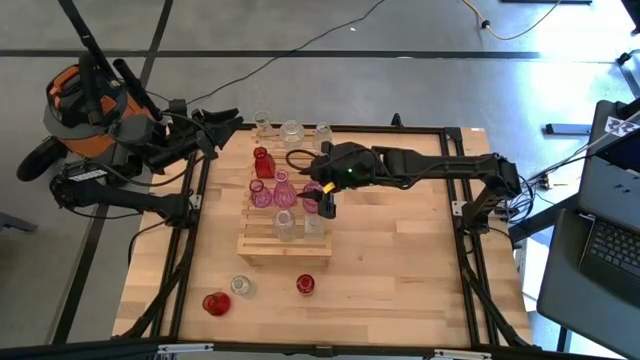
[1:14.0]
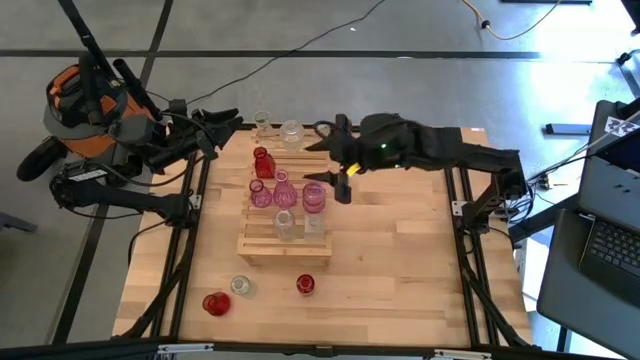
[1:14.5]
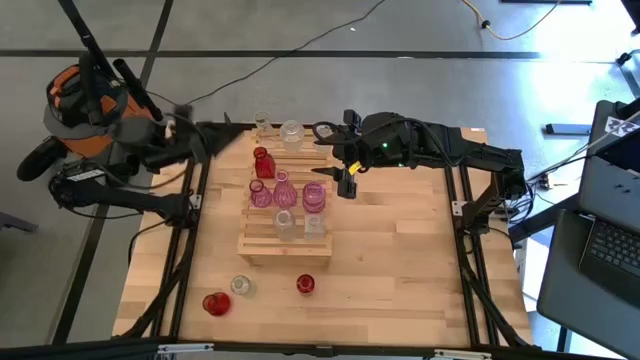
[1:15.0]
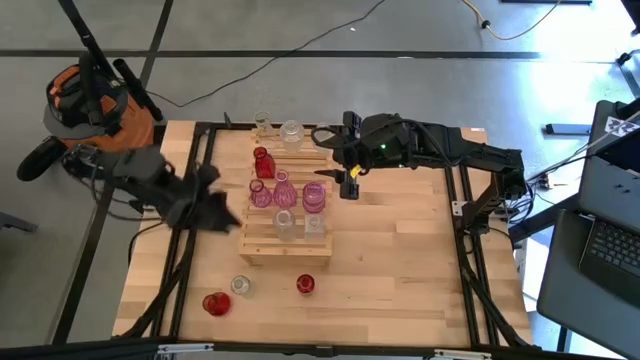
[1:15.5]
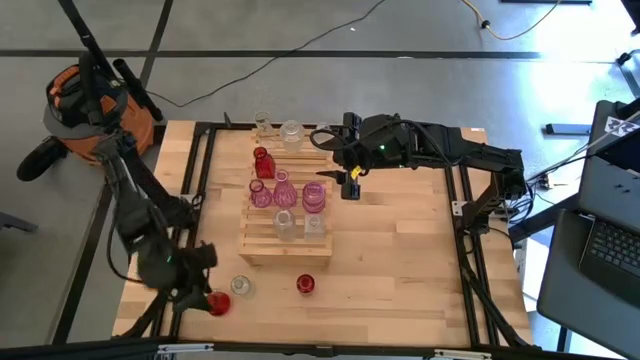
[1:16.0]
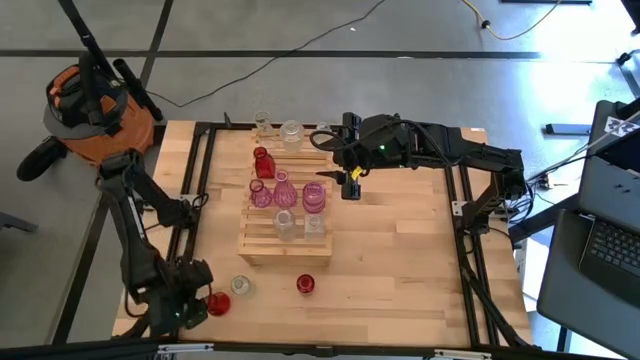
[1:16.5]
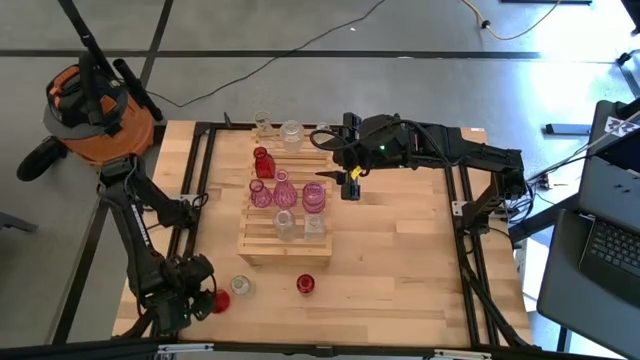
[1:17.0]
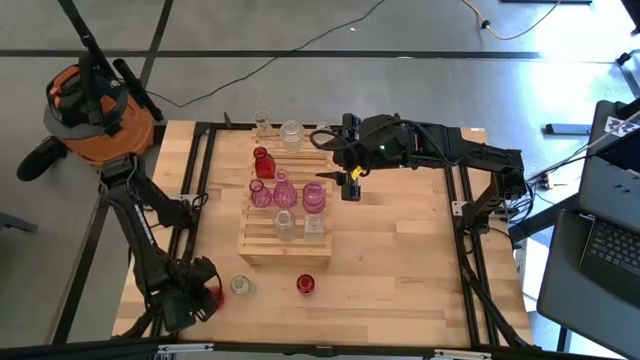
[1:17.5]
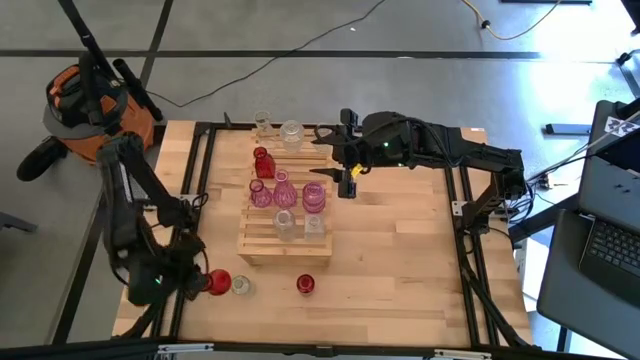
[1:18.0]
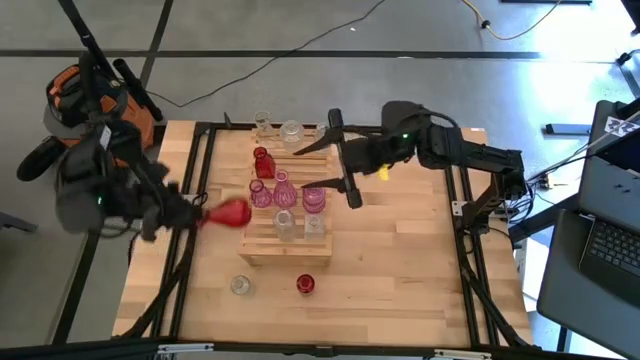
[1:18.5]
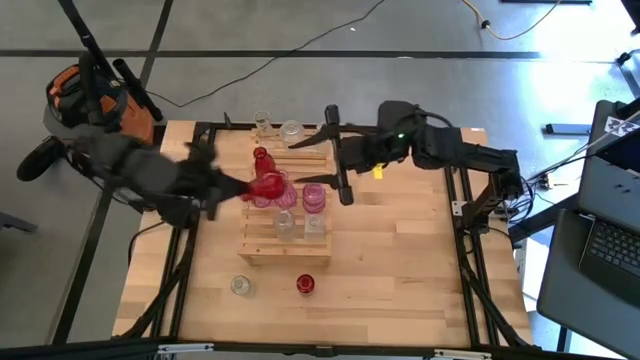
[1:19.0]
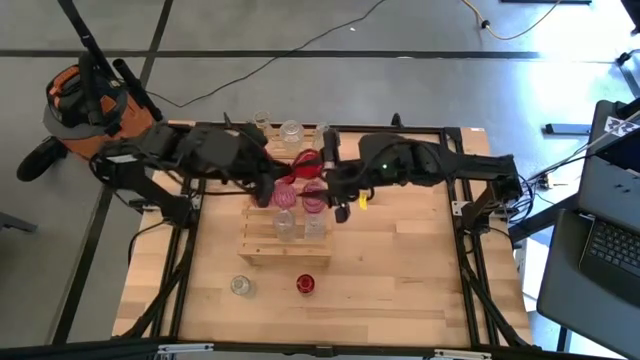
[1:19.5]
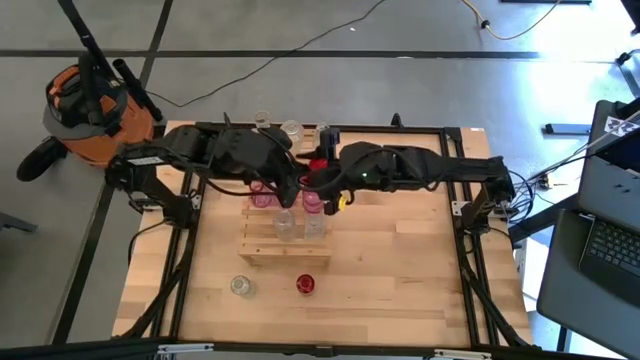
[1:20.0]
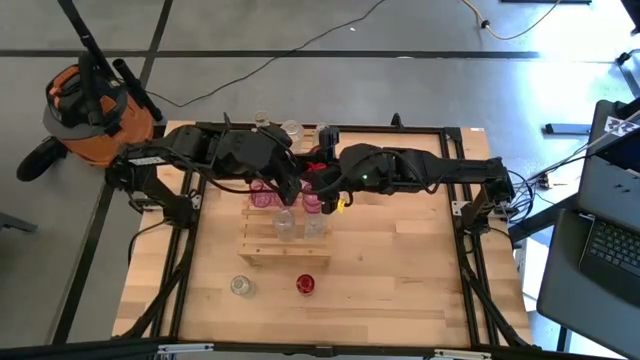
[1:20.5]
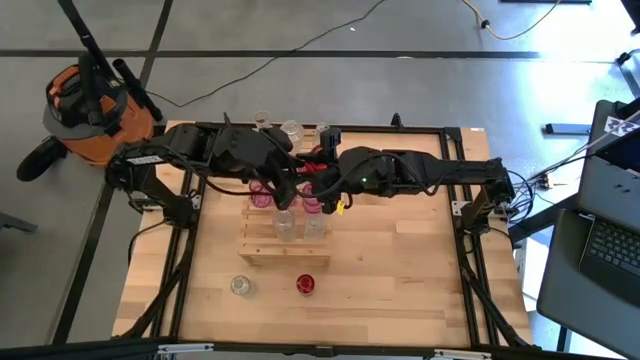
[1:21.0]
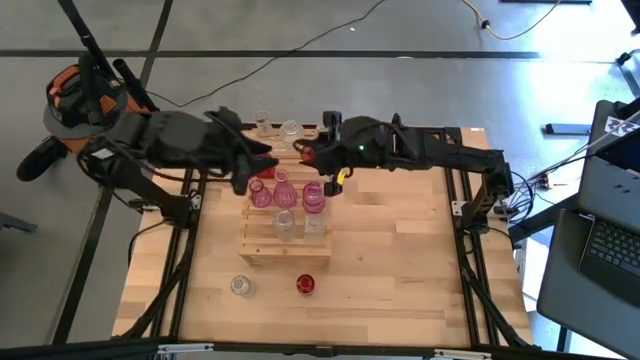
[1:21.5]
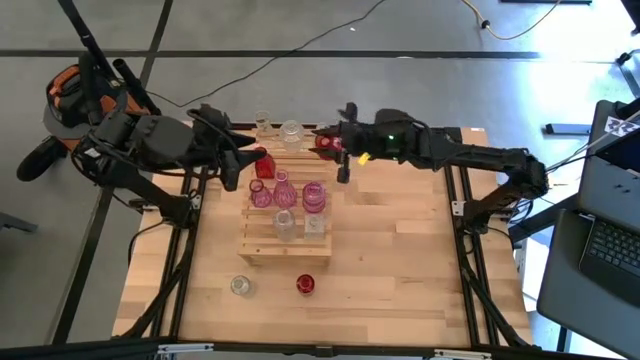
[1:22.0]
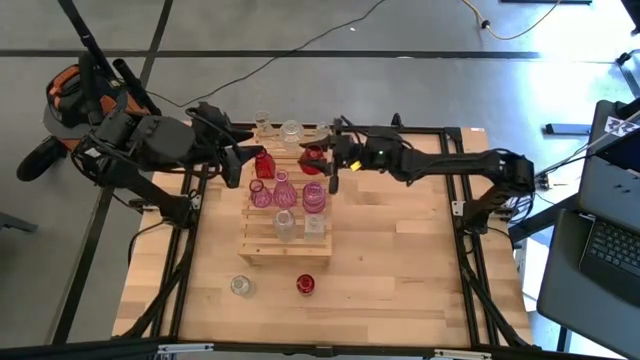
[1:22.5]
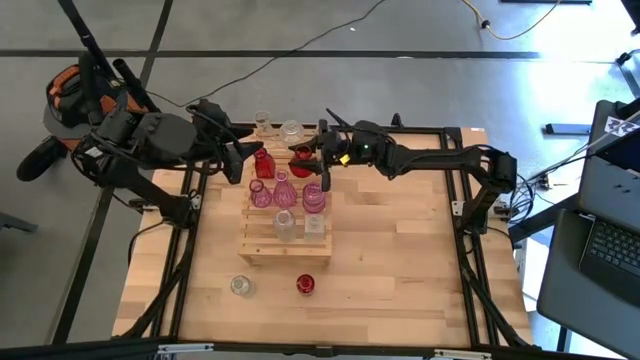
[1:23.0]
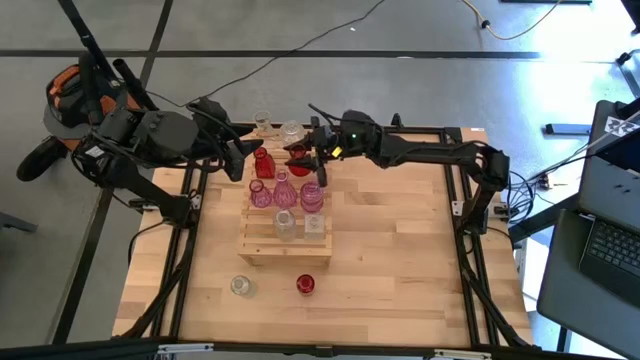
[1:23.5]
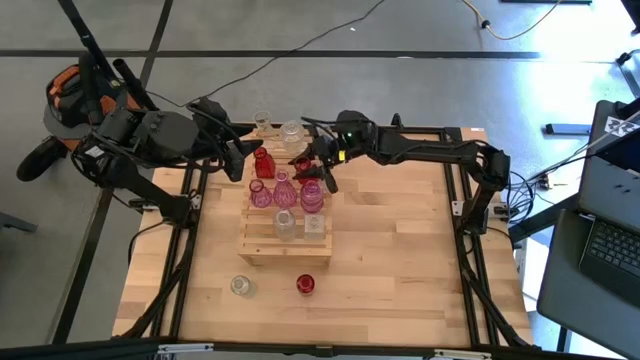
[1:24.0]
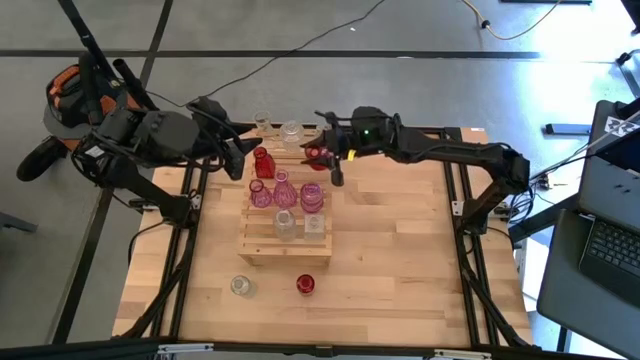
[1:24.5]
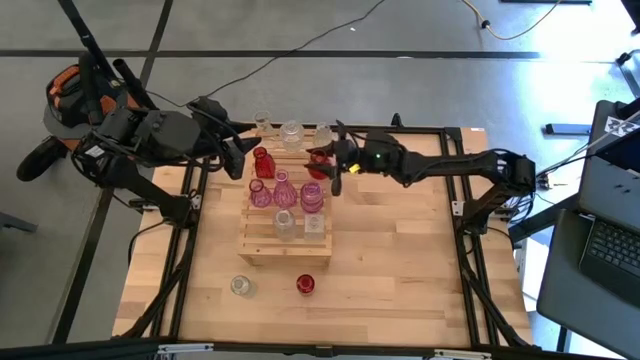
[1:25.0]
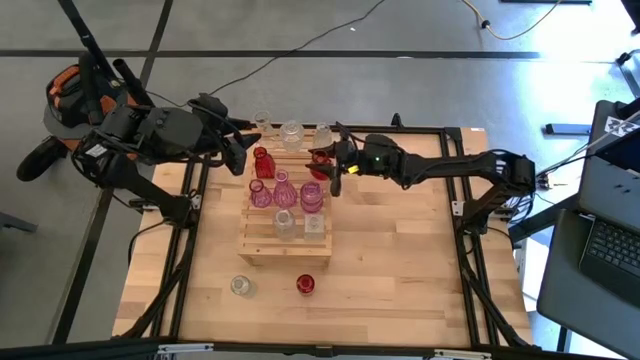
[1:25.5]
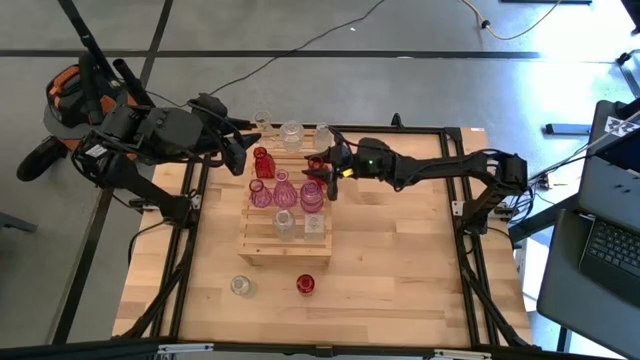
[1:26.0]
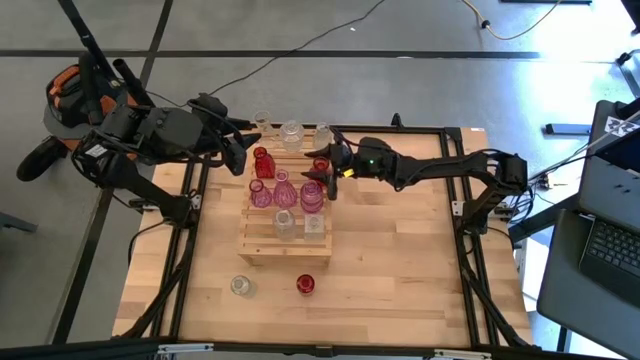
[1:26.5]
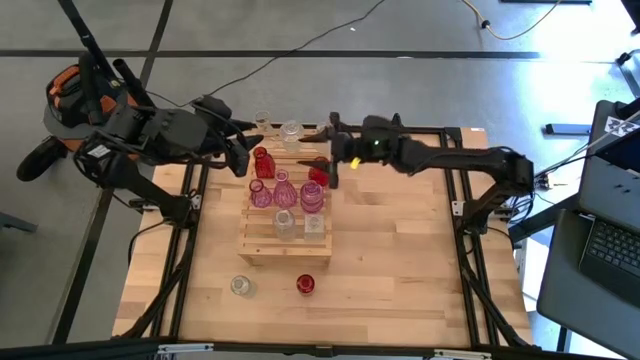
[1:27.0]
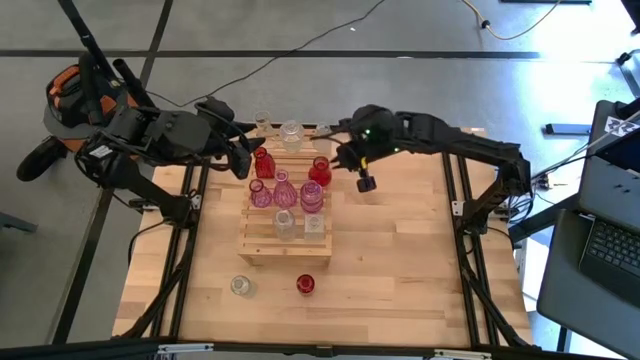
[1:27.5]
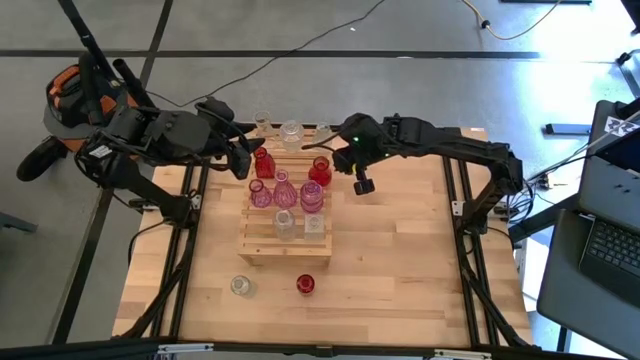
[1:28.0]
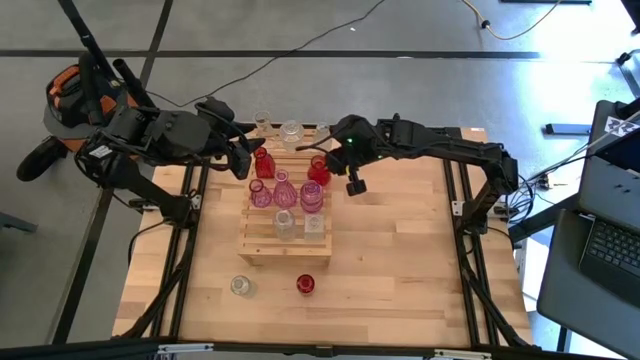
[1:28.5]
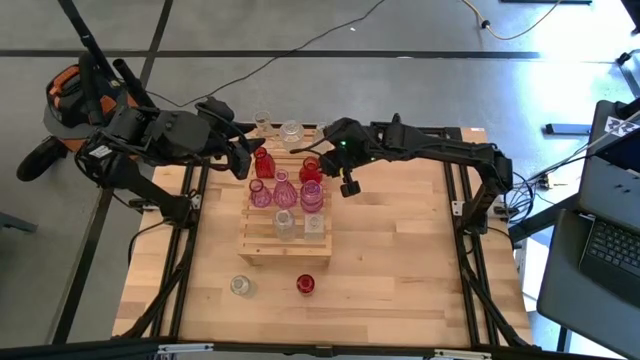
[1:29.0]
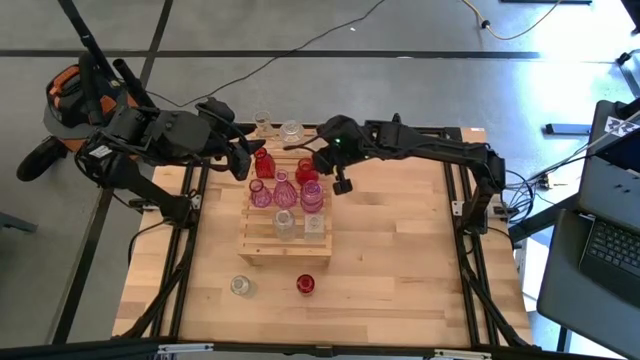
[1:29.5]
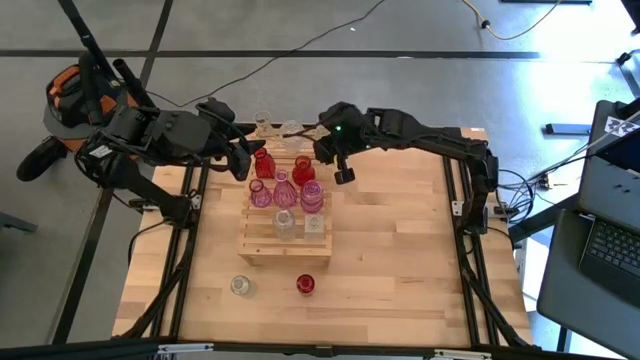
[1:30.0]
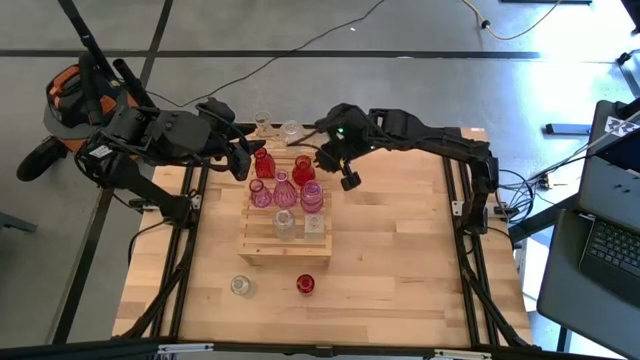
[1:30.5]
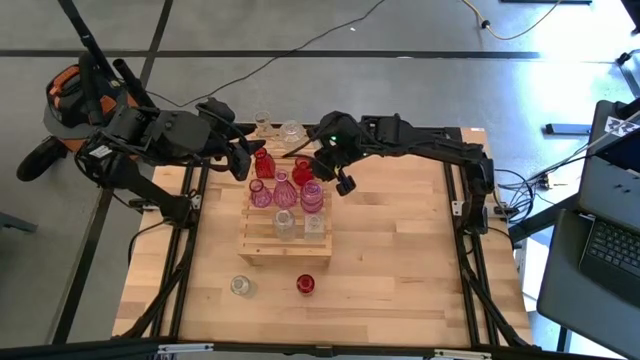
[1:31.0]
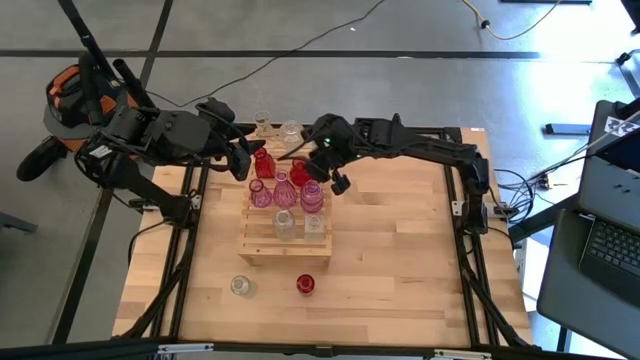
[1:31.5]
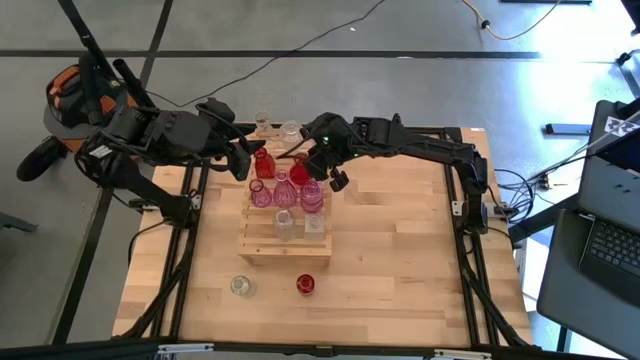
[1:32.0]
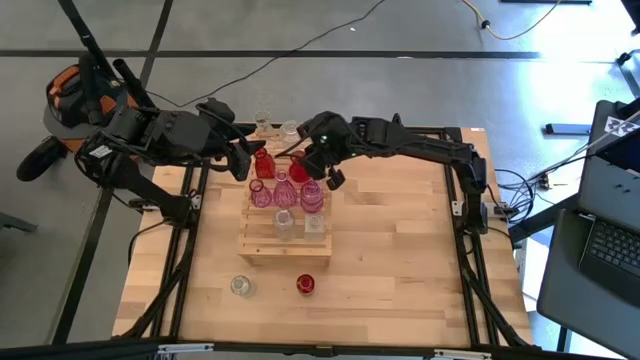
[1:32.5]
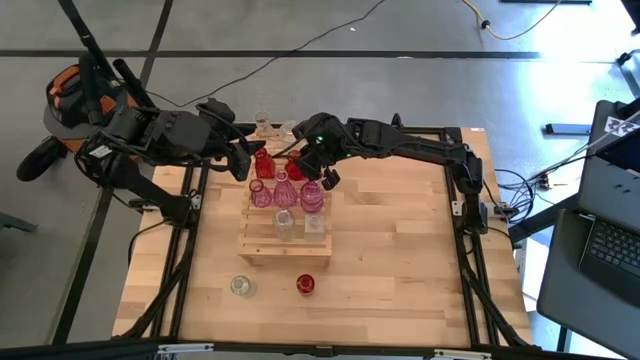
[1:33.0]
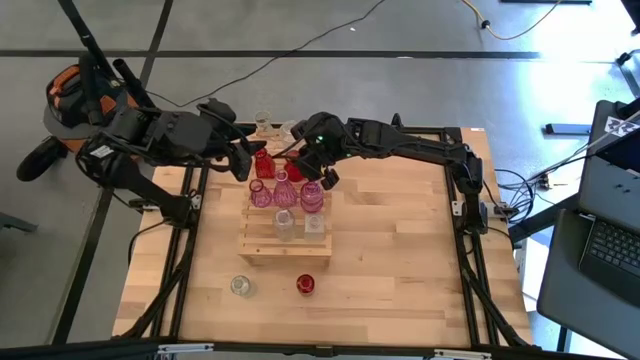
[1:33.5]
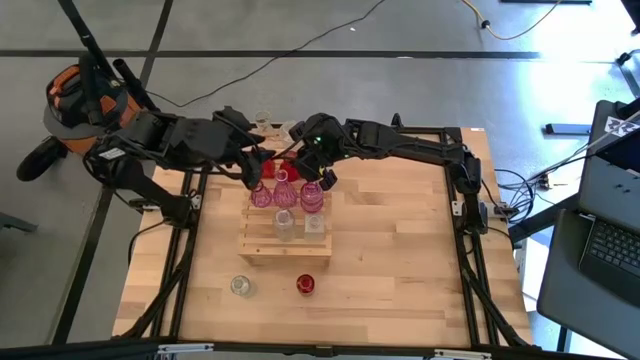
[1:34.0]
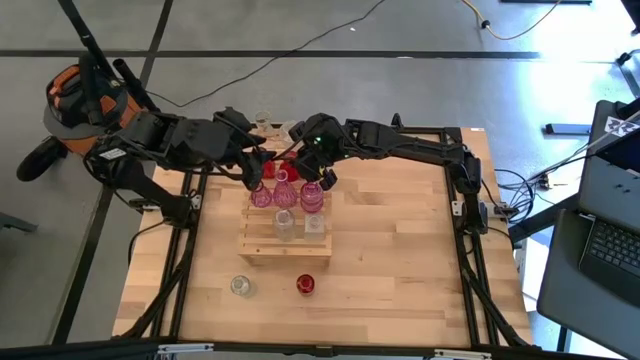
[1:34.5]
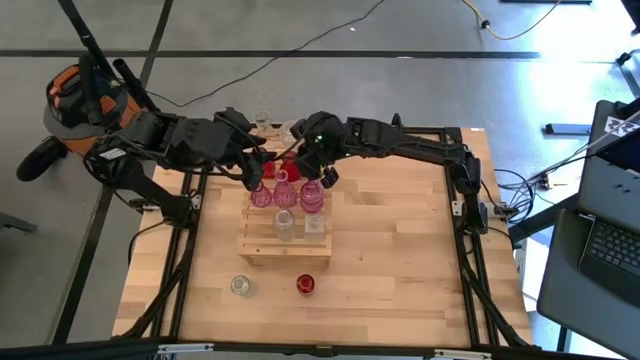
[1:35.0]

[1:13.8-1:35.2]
Task: sort vases onto shelf
Put the red vase on the shelf aligned with the other red vase
